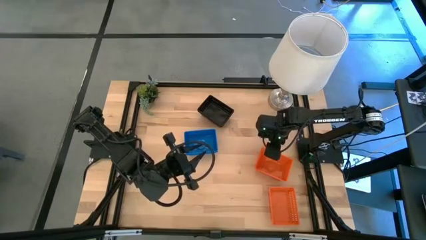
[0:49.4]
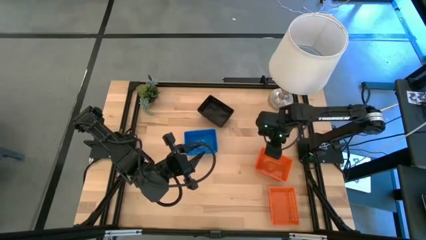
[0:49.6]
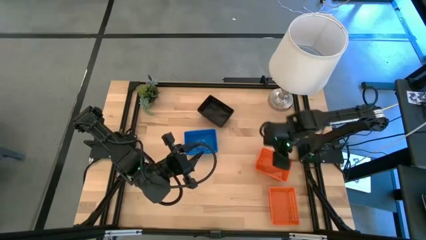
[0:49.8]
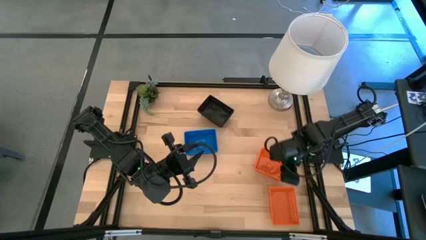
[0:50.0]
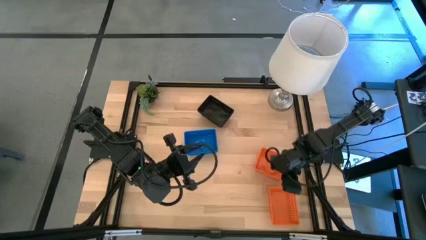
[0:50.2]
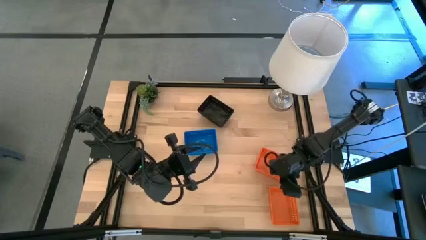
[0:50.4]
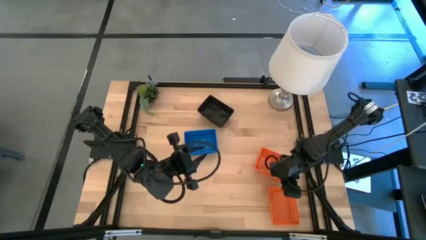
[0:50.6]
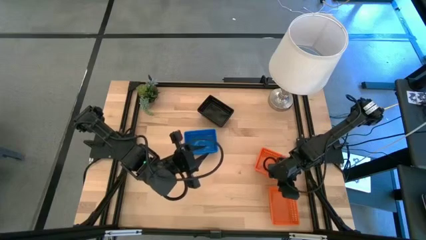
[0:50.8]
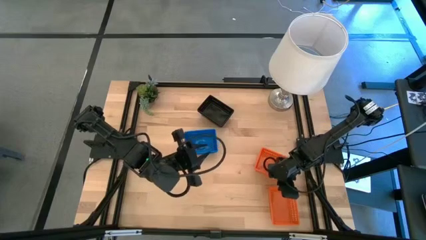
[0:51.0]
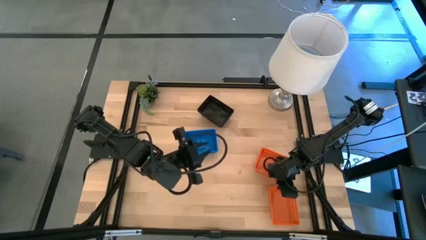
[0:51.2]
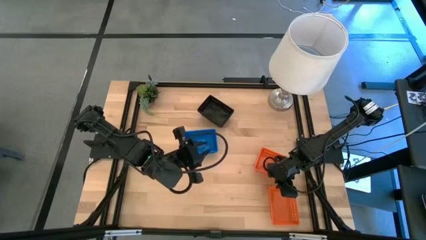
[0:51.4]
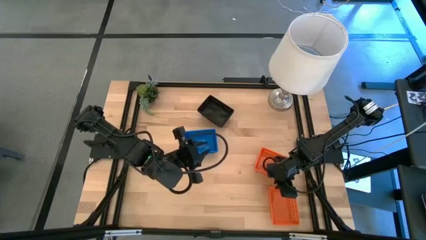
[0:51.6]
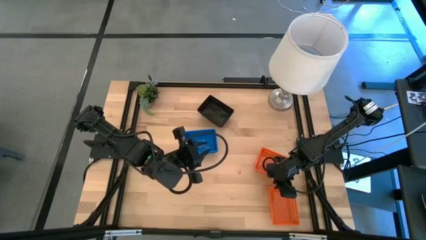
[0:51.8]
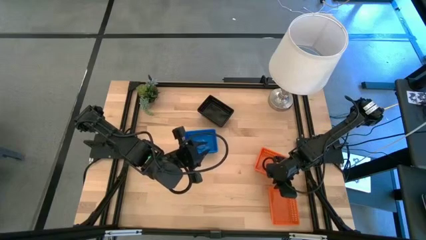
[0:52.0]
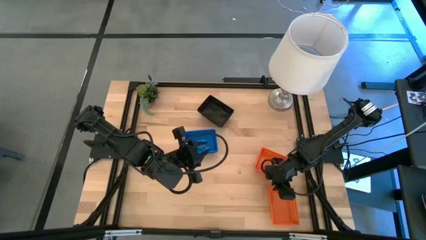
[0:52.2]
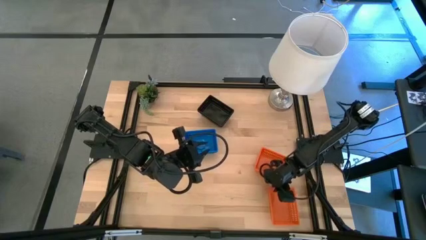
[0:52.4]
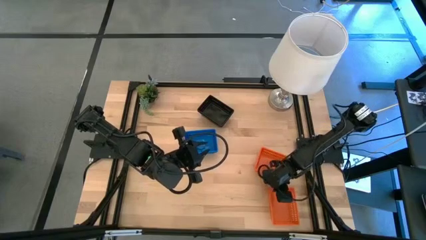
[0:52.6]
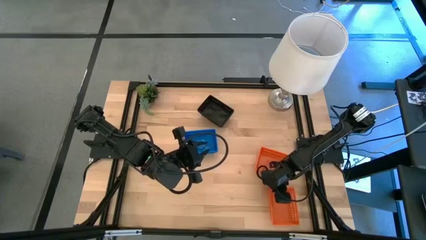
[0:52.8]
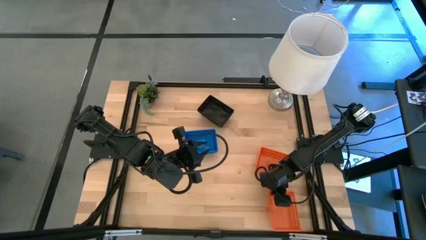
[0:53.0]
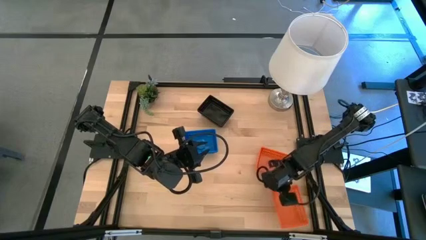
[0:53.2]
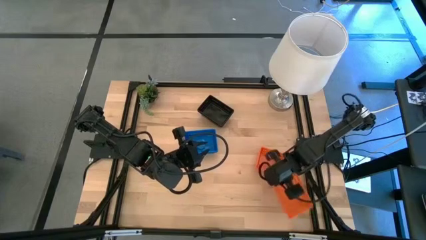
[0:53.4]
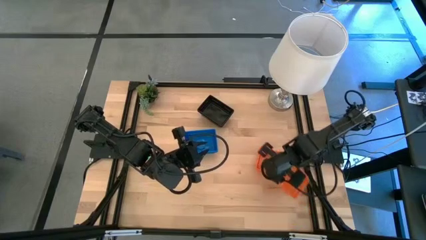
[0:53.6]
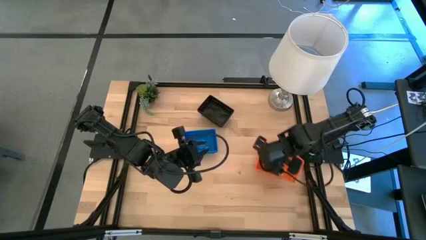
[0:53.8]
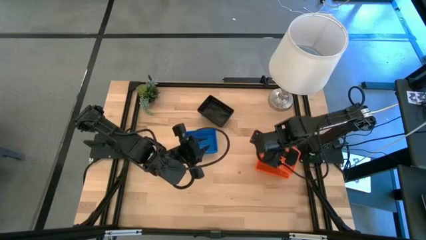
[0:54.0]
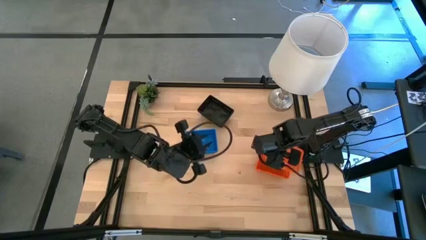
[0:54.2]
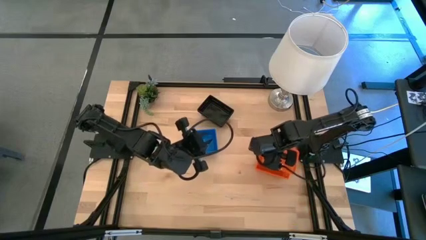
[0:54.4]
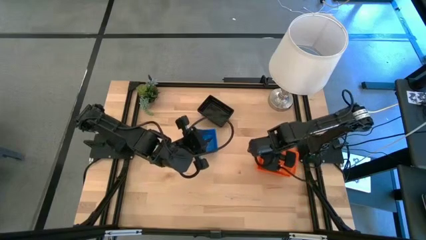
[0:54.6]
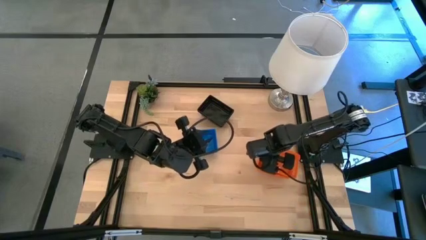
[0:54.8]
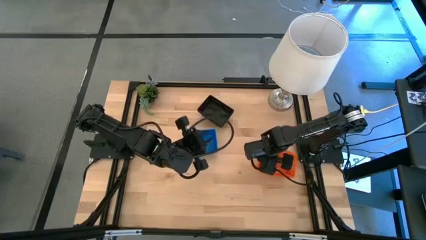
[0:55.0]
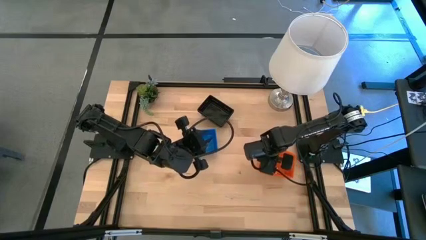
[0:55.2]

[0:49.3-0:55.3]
Stack the bottom orange bin on the stacked orange bins

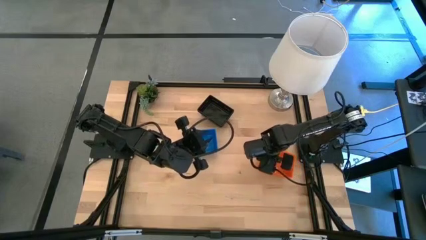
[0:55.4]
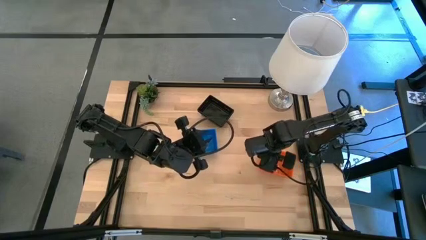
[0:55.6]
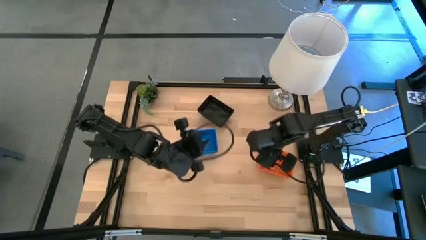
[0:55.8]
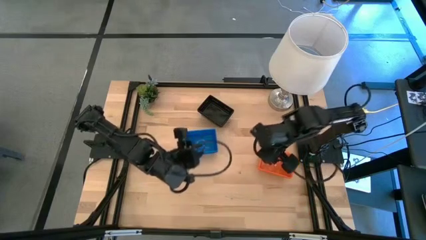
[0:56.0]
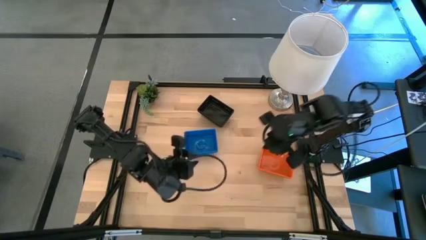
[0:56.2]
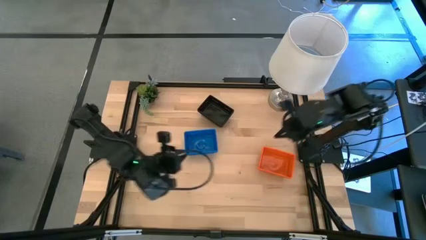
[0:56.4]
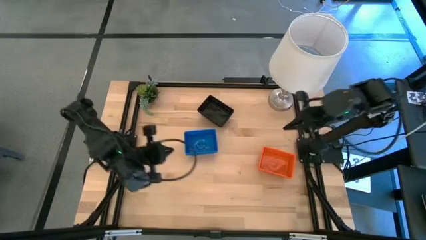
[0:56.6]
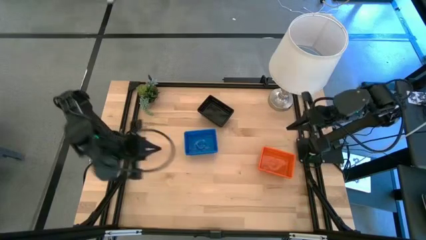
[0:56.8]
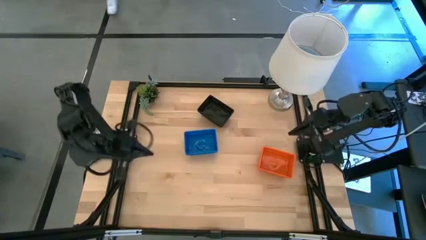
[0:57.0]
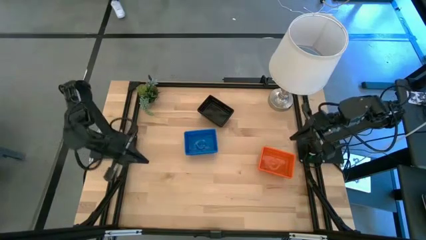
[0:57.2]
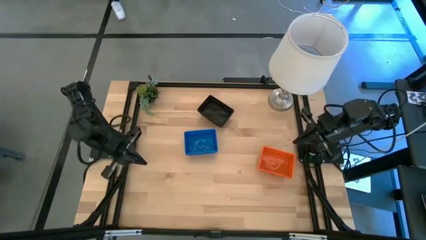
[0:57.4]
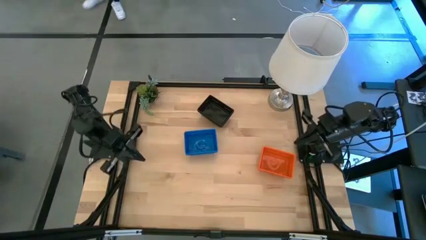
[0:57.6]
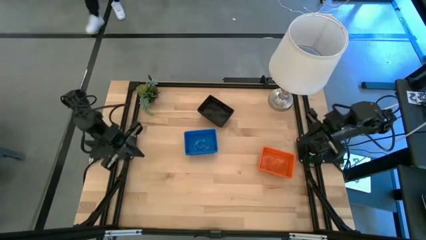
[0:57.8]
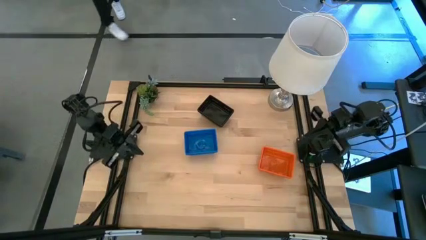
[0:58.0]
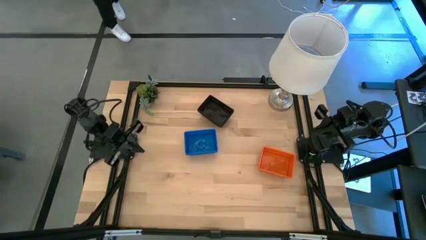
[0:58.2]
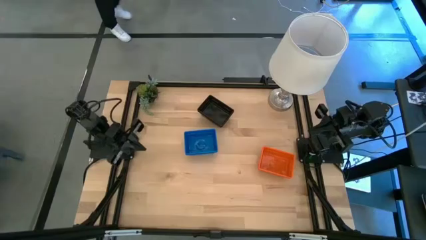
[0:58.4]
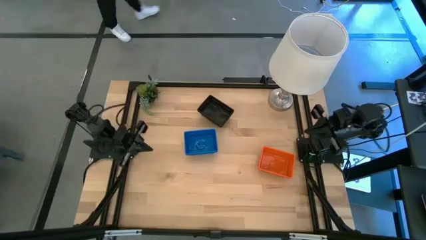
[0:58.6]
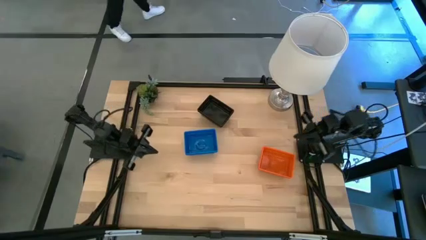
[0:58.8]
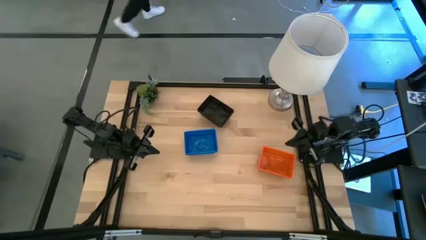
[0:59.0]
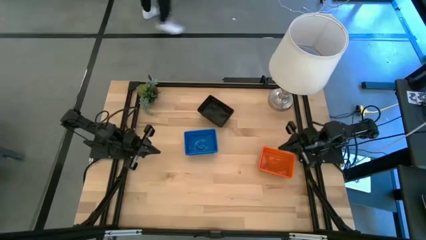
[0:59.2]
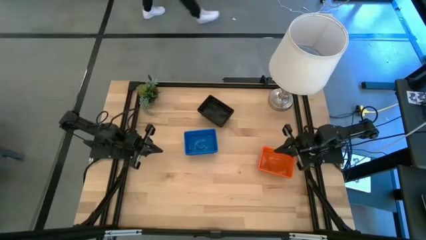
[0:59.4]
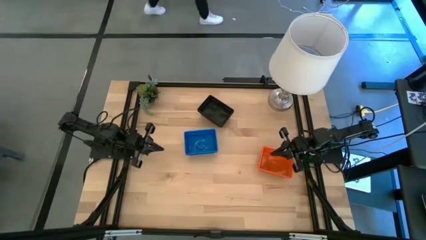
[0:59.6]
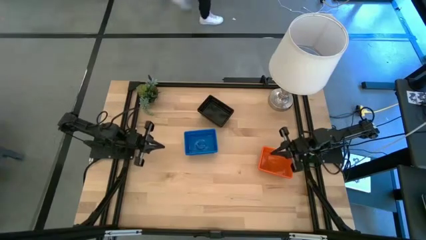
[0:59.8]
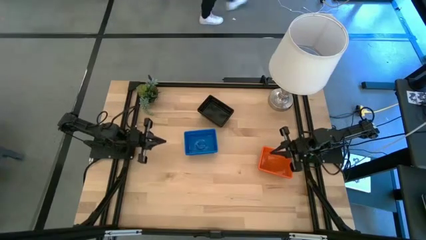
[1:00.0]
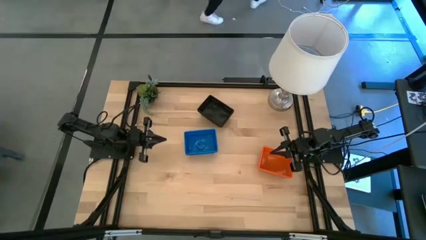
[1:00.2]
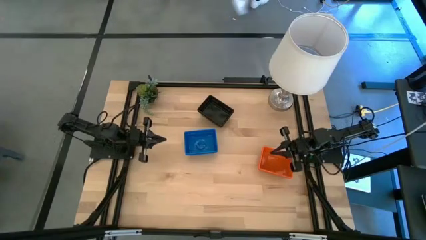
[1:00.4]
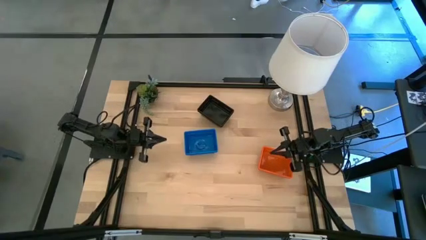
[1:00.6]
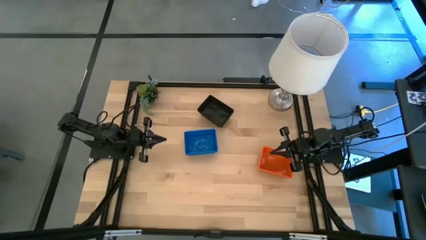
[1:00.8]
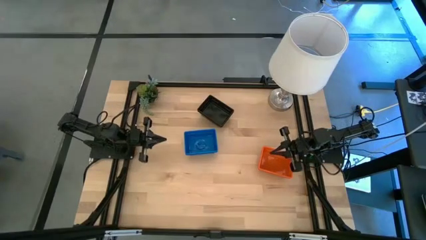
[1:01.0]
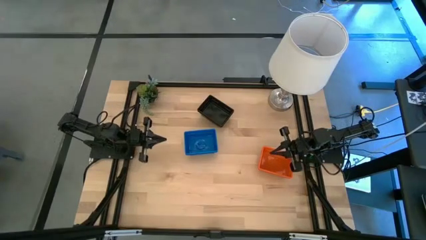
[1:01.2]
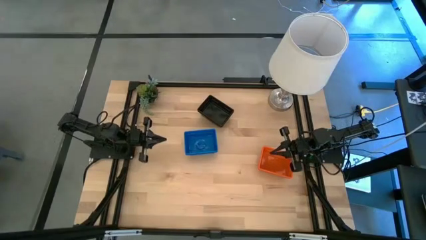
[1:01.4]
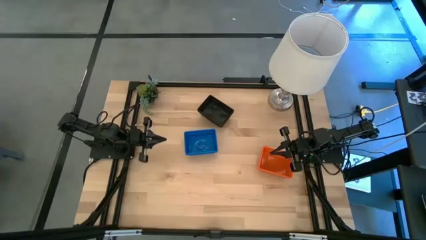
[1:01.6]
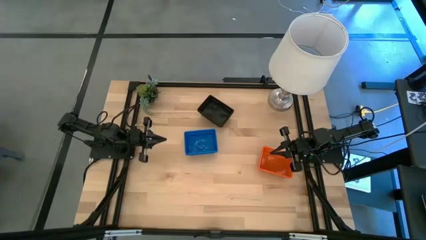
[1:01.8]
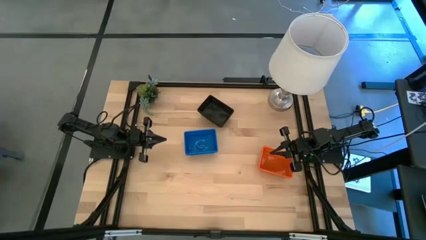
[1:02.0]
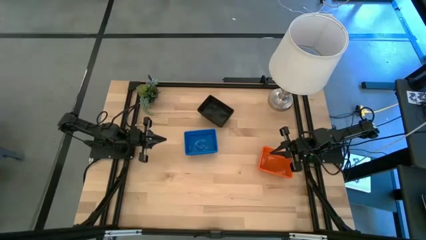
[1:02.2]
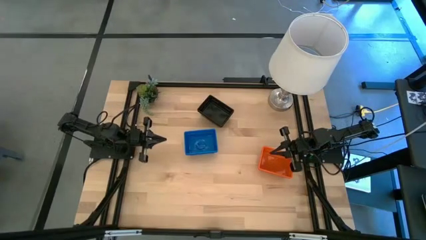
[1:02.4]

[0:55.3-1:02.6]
Return to Home Position
